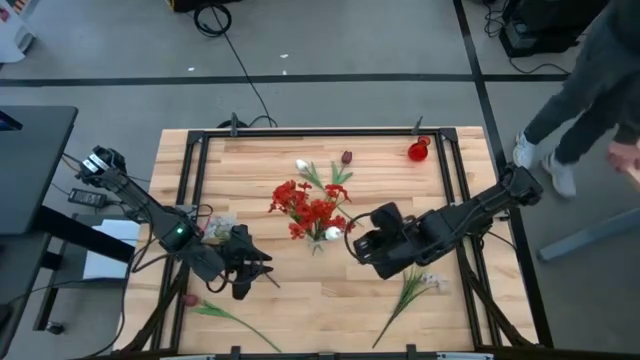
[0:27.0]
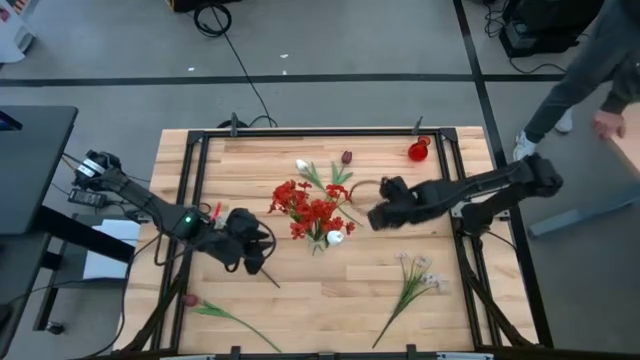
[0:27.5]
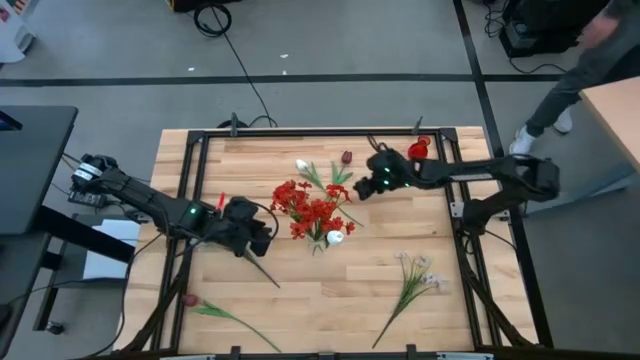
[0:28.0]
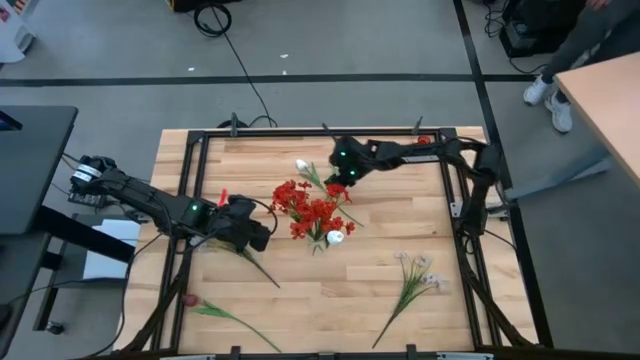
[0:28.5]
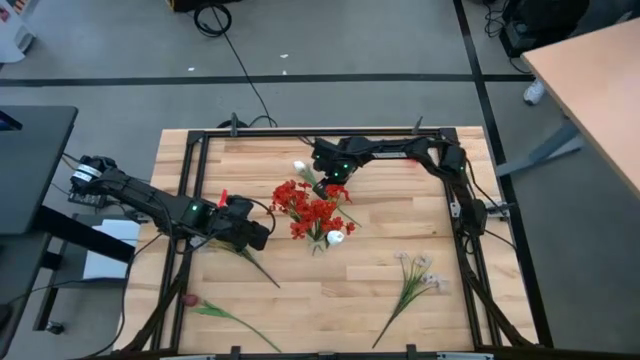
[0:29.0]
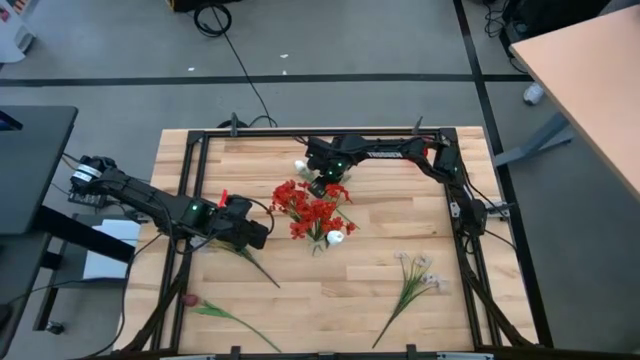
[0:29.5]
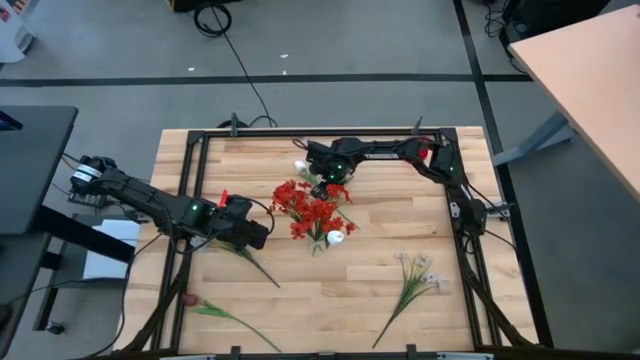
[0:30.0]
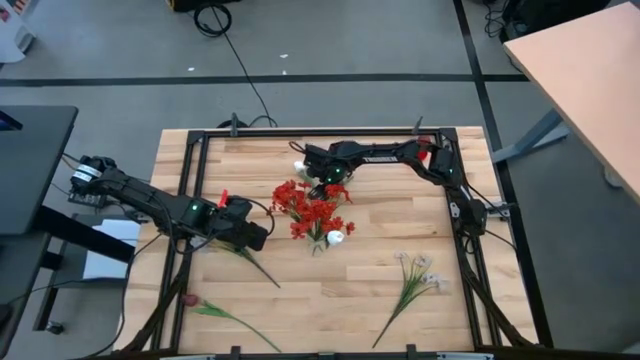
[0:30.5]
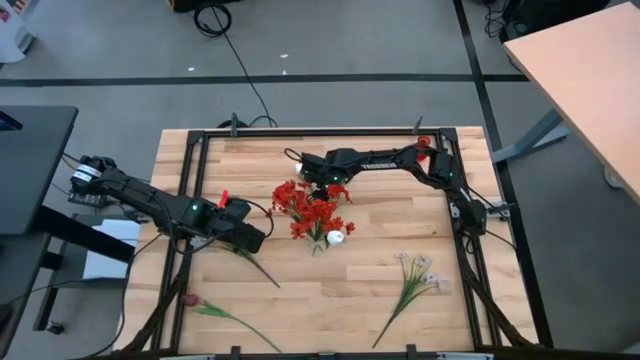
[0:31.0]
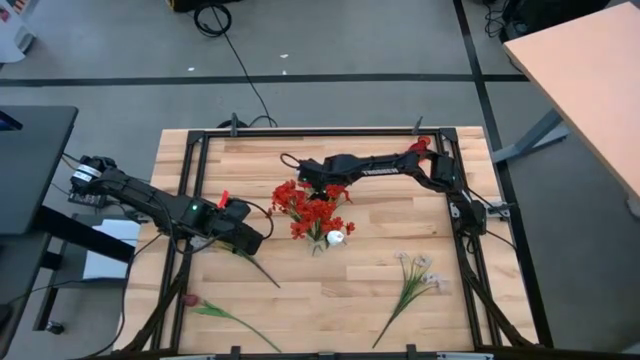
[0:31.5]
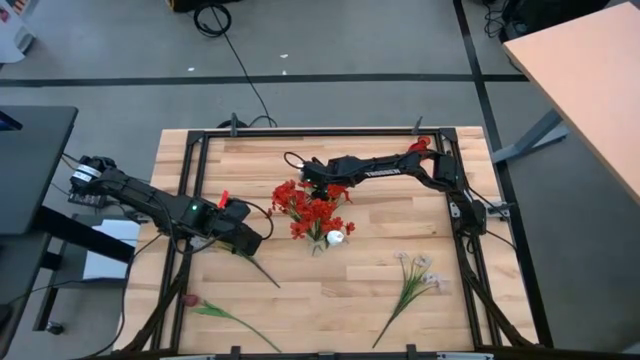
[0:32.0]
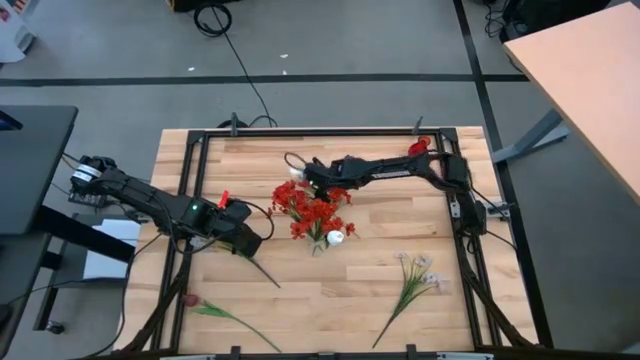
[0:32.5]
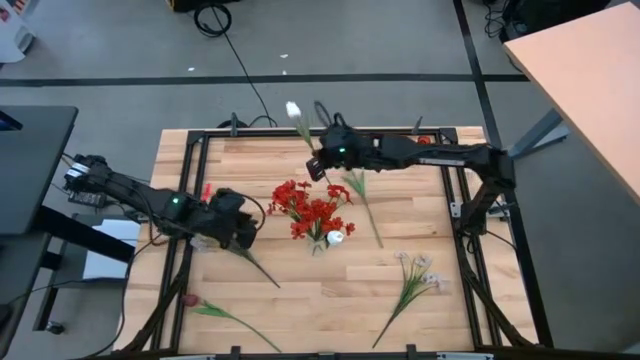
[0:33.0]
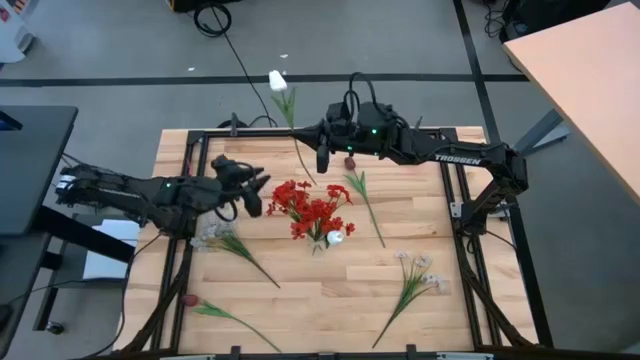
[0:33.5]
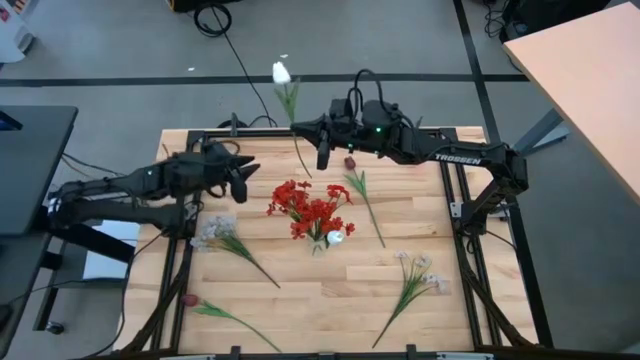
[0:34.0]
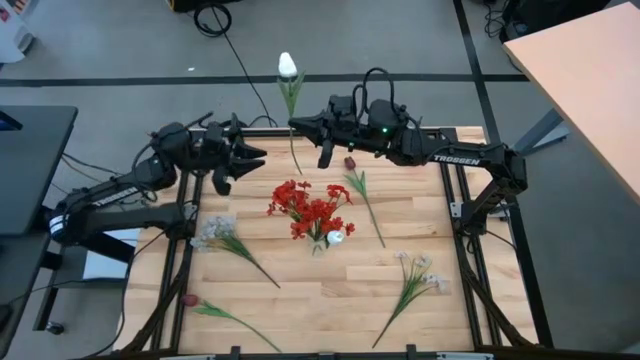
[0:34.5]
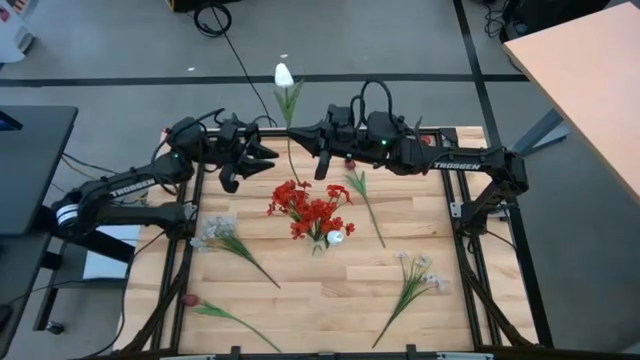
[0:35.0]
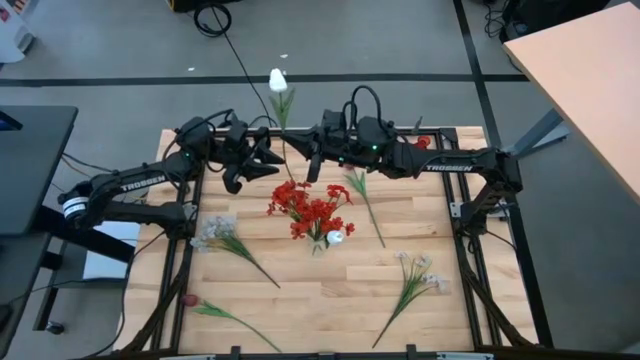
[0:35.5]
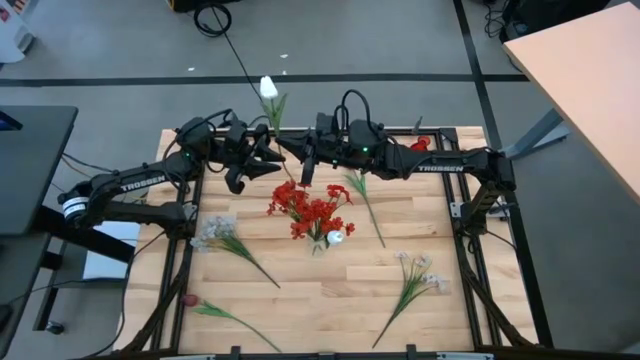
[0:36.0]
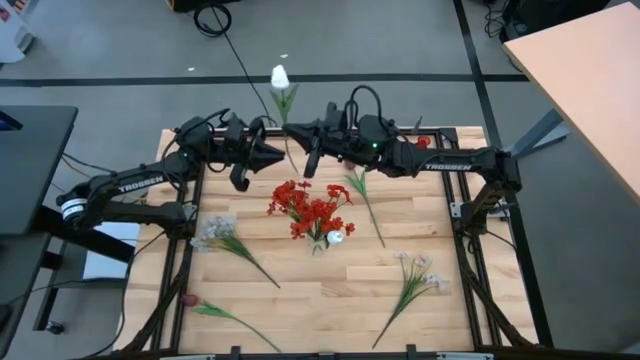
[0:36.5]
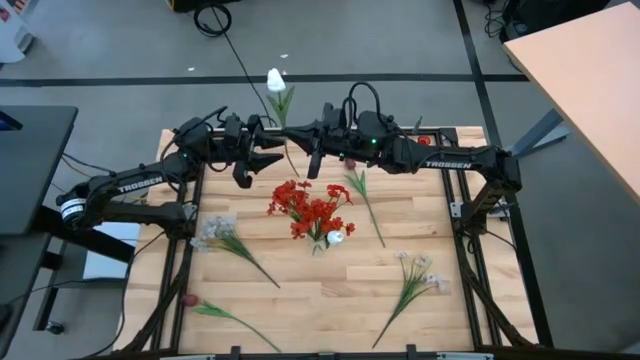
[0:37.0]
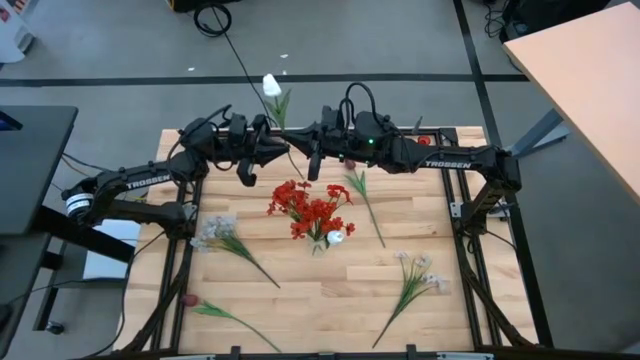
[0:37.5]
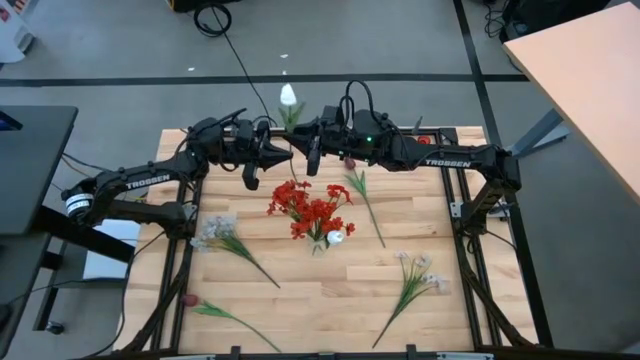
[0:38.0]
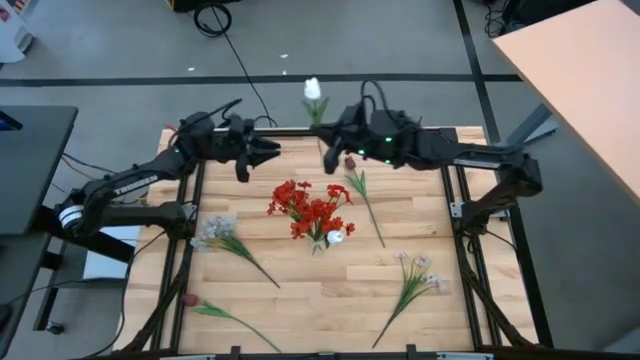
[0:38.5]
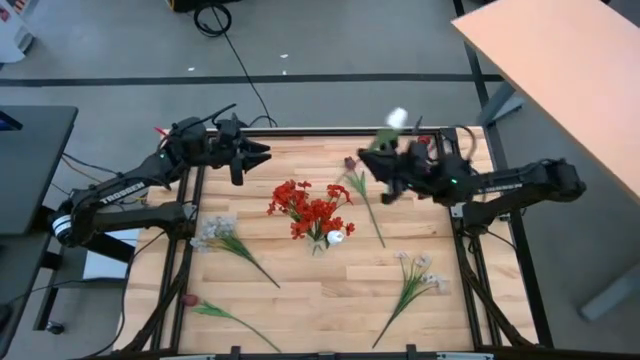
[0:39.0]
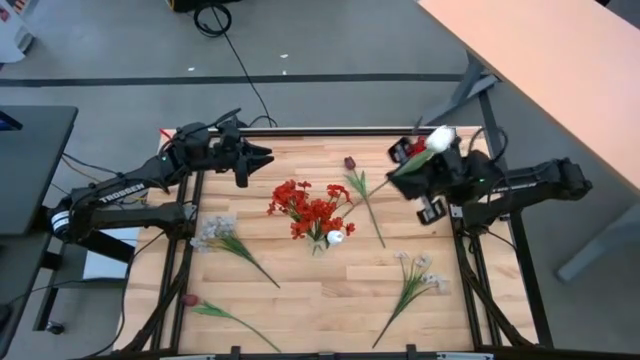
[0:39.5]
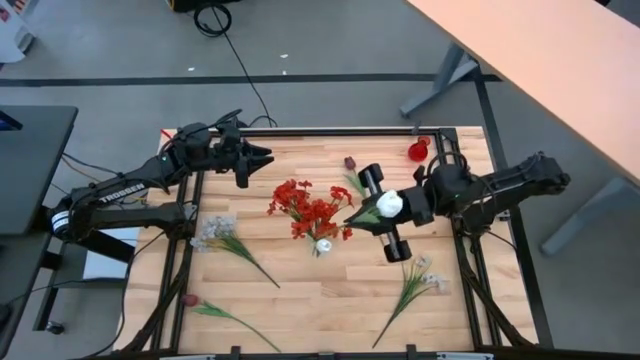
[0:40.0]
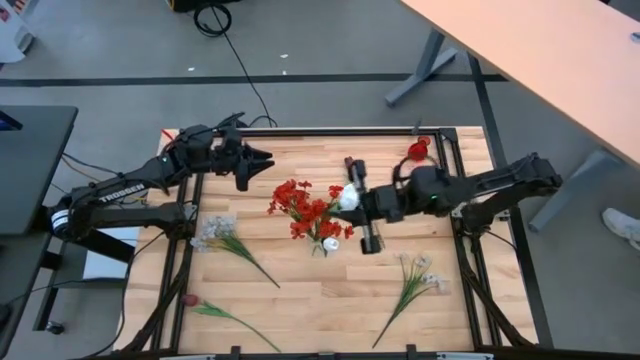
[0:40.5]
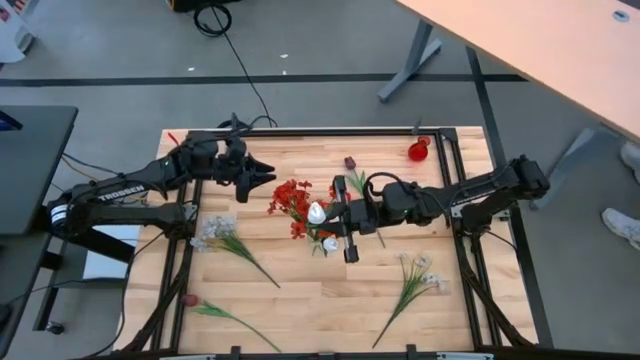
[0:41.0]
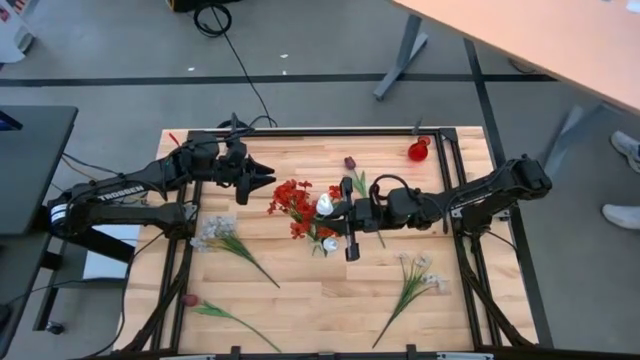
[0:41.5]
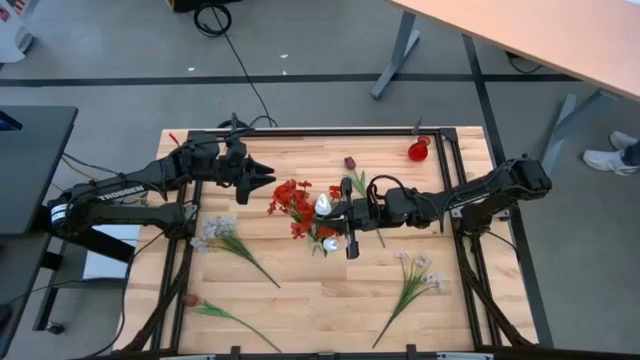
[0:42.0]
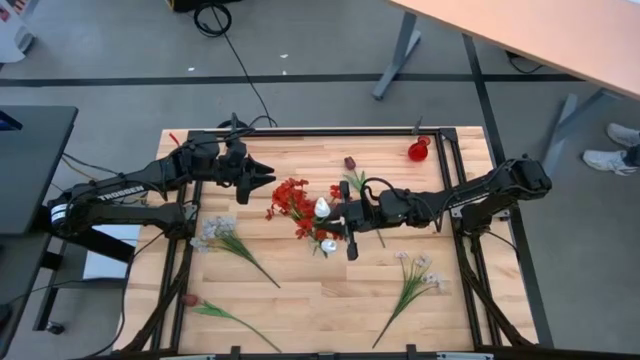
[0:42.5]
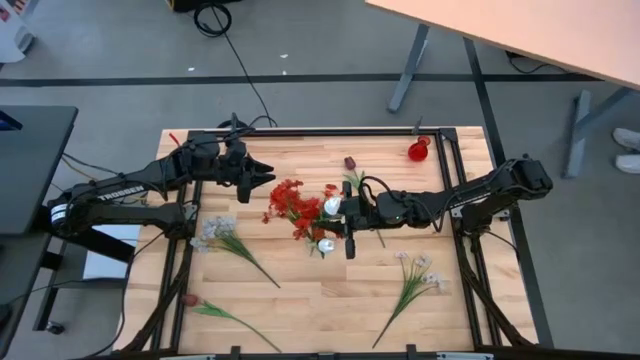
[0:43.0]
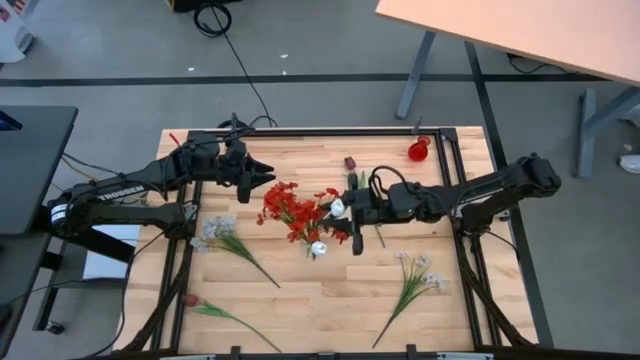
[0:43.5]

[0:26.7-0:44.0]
Task: Sort flowers into vase by color
Put the white flower into the transparent vase

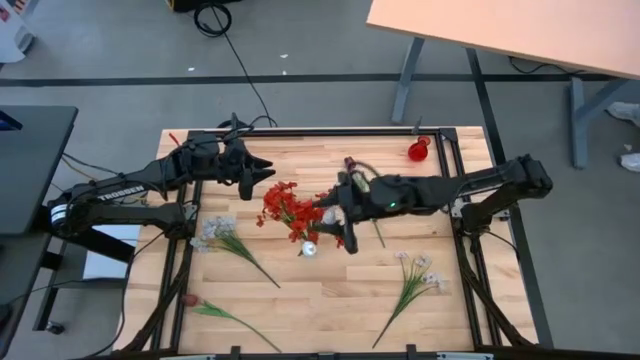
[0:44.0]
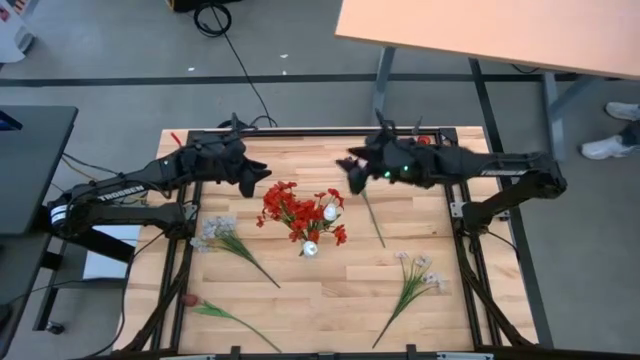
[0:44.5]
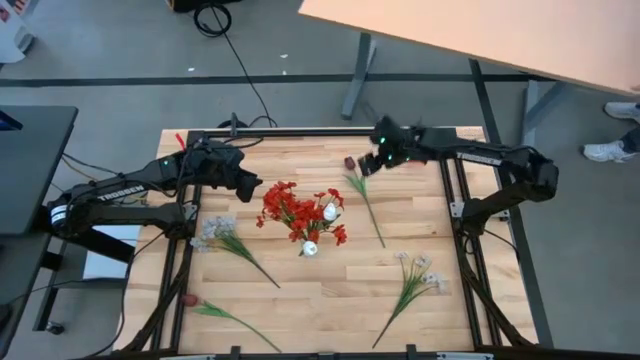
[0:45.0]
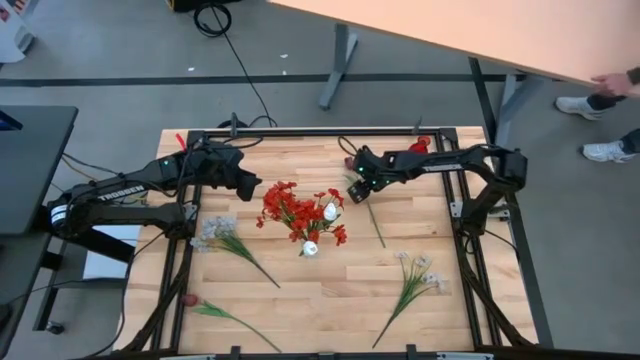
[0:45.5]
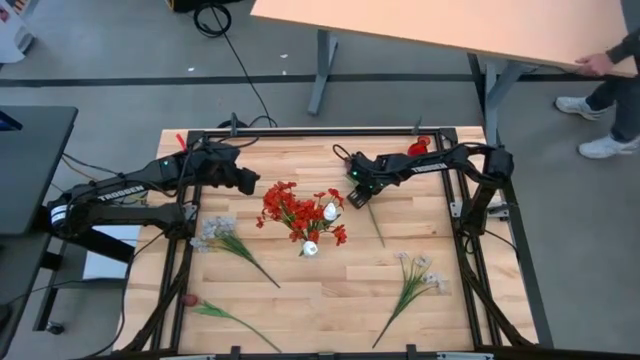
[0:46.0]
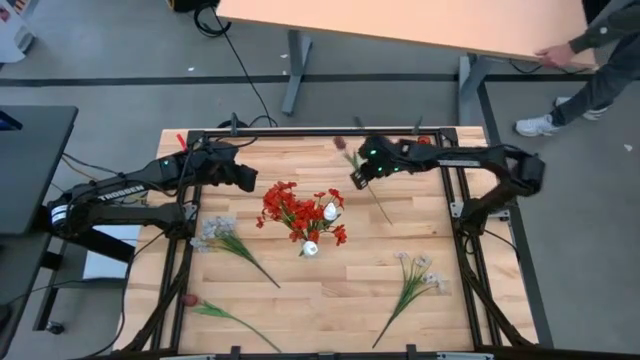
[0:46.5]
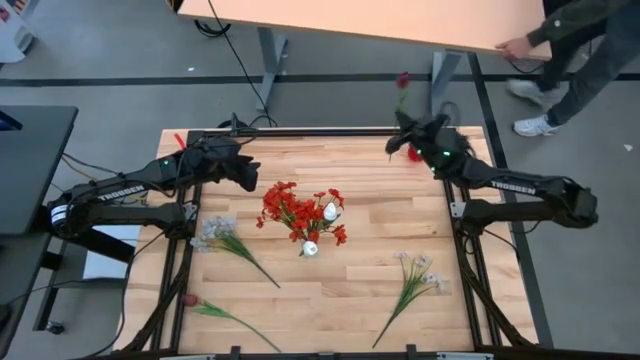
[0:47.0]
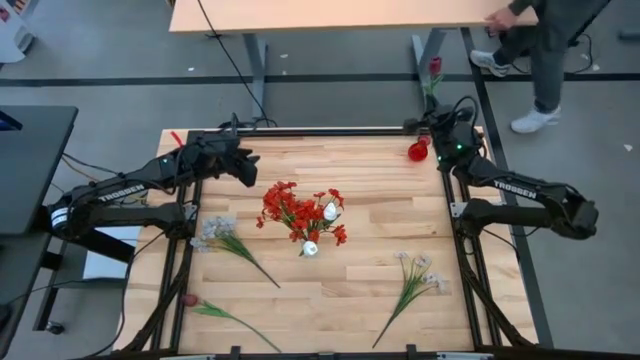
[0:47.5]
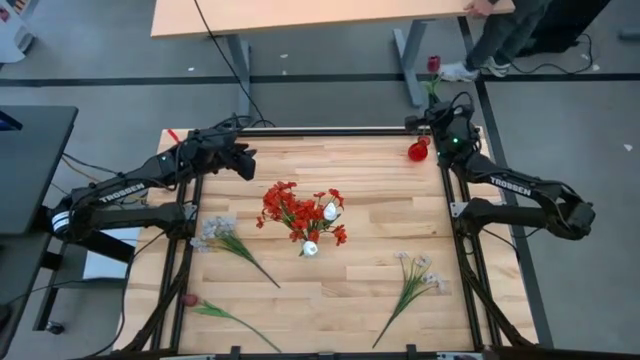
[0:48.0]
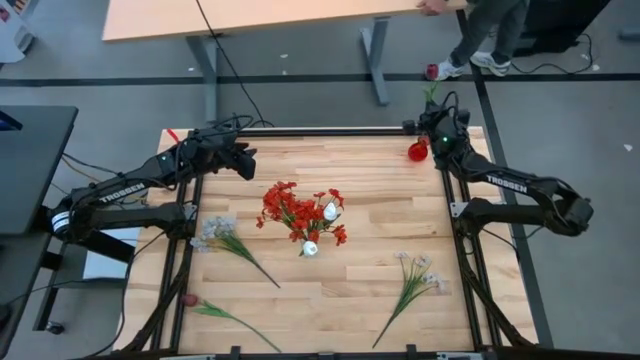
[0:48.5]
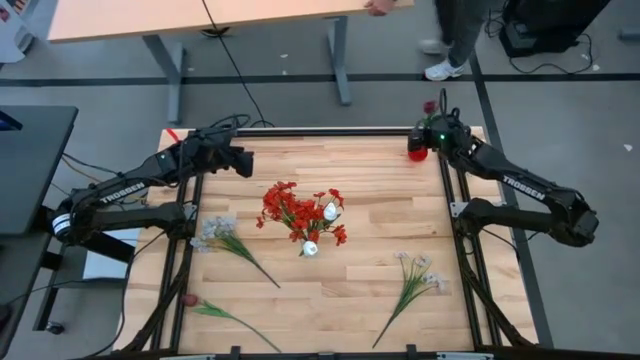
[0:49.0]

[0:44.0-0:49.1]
Put the top dark red flower into the red vase
